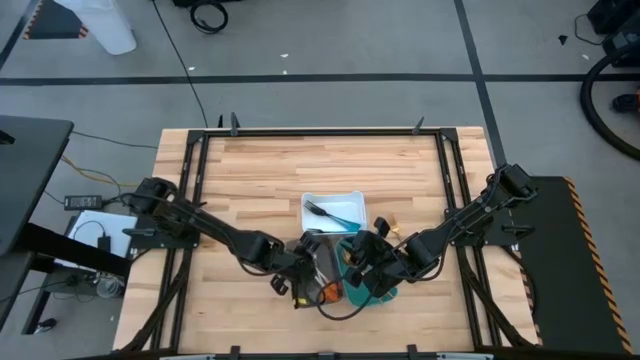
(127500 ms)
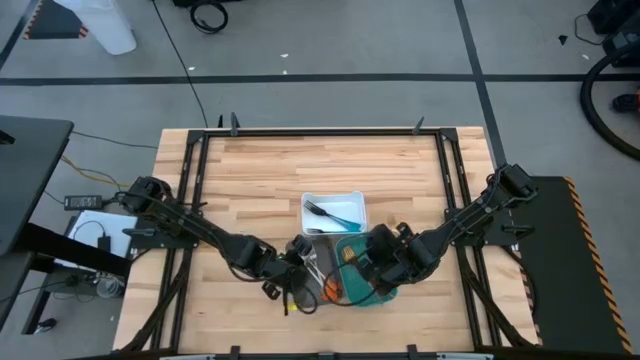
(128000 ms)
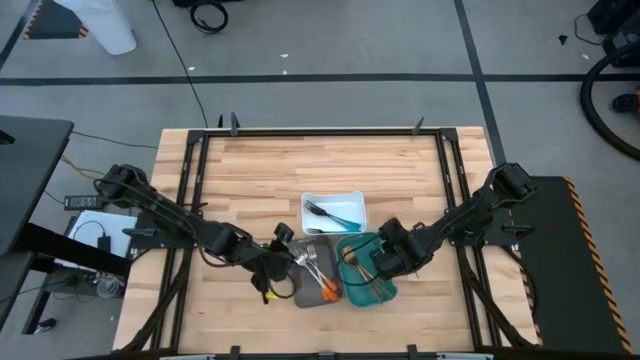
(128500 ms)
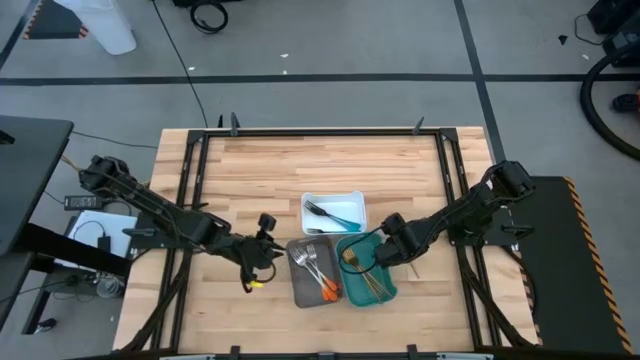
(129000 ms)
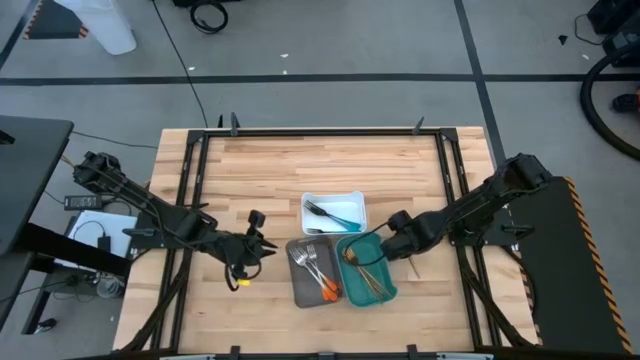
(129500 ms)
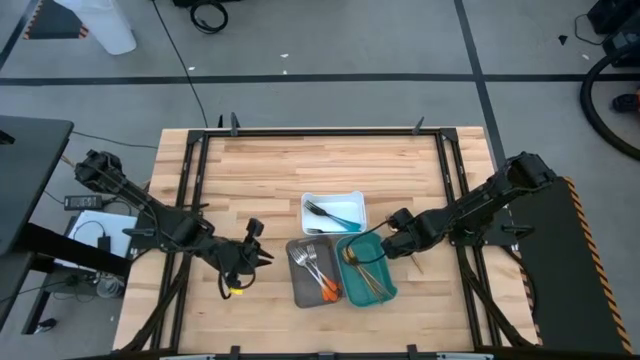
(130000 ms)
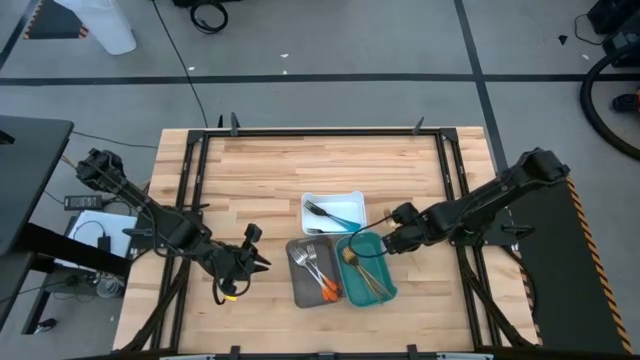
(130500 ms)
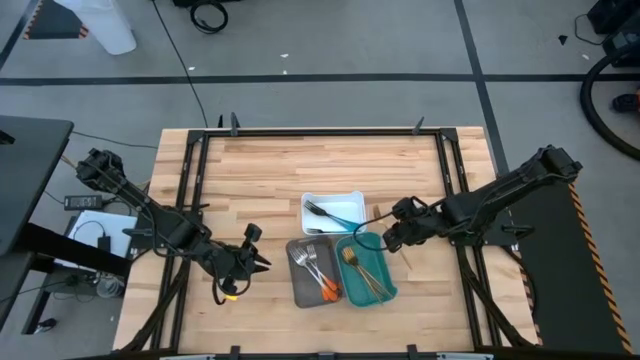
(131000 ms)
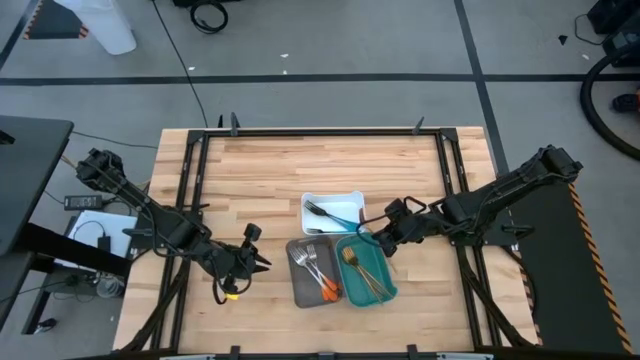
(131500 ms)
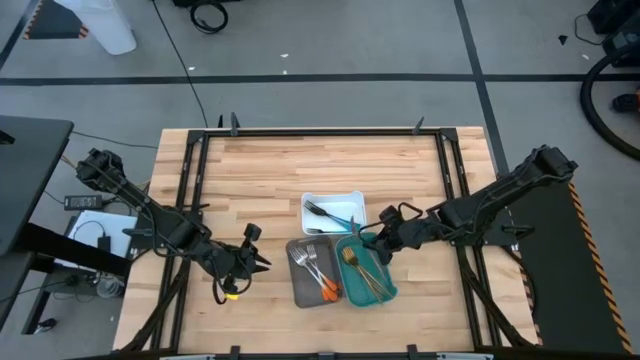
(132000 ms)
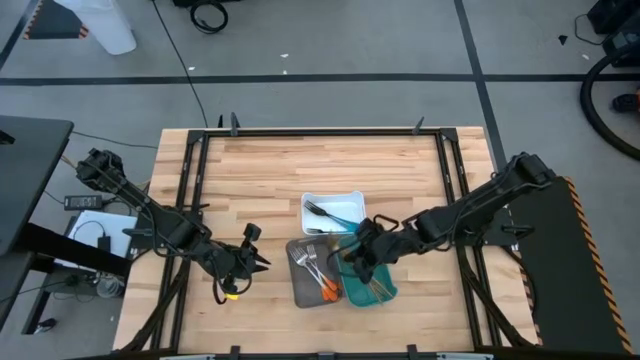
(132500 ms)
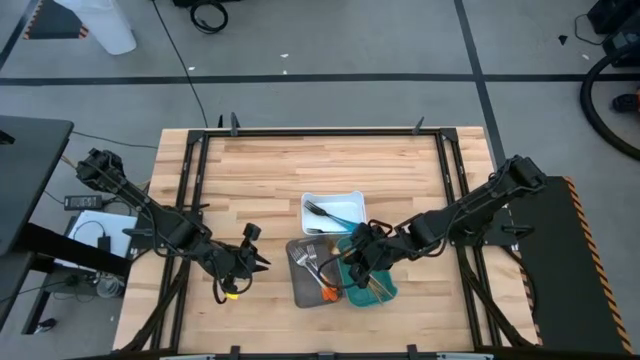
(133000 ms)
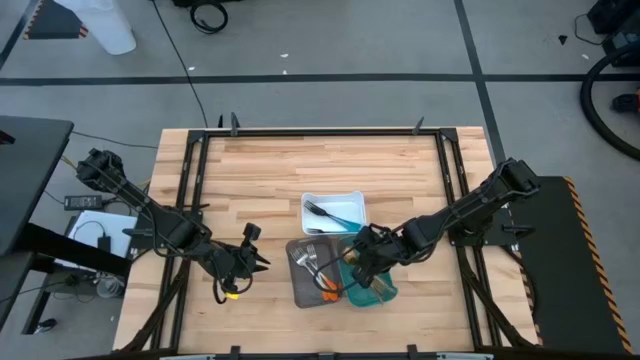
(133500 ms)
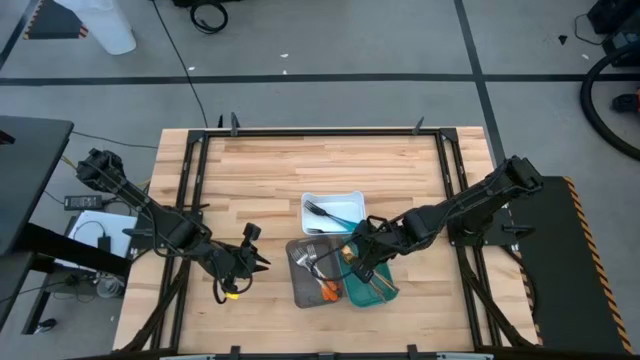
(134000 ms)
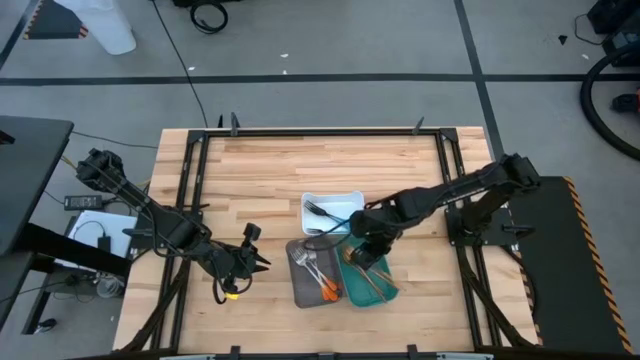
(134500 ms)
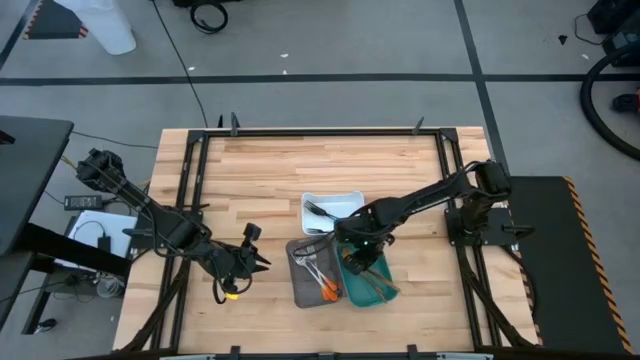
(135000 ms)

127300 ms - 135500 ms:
Task: Sort silverware by color (type)
Put the gold fork into the green bin

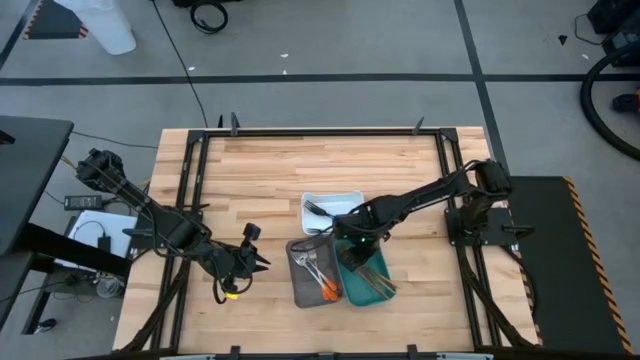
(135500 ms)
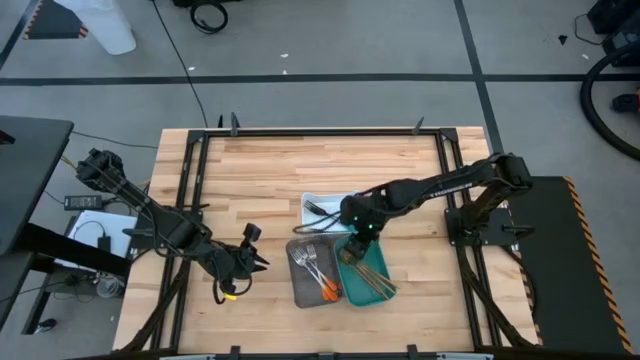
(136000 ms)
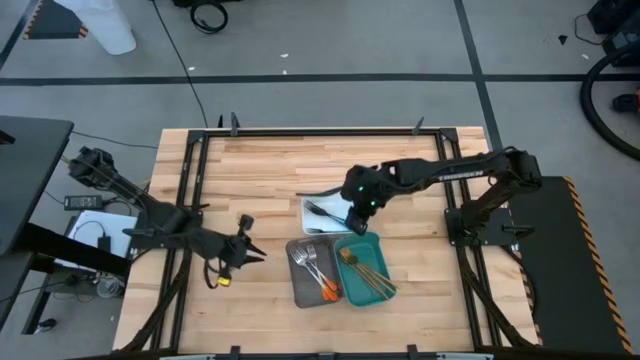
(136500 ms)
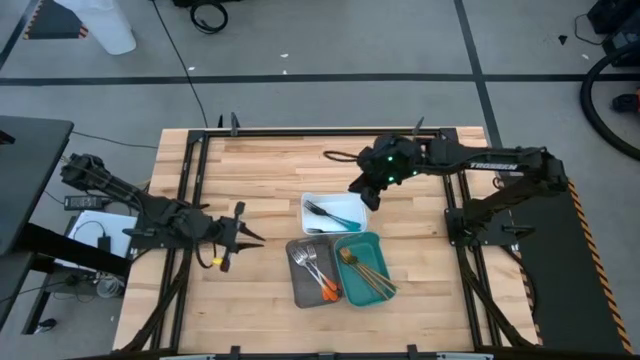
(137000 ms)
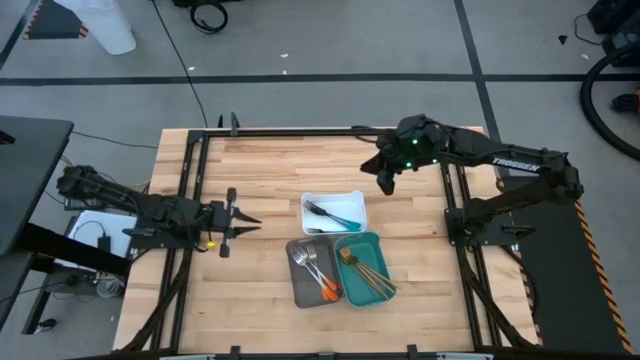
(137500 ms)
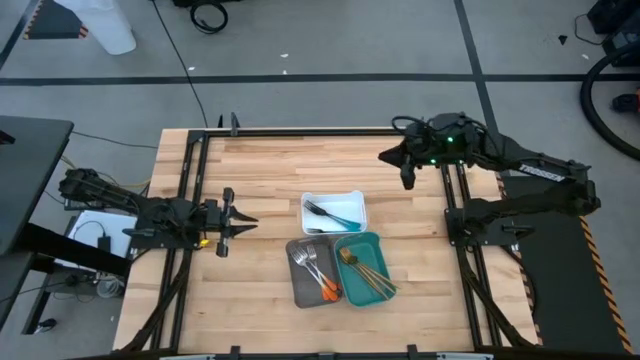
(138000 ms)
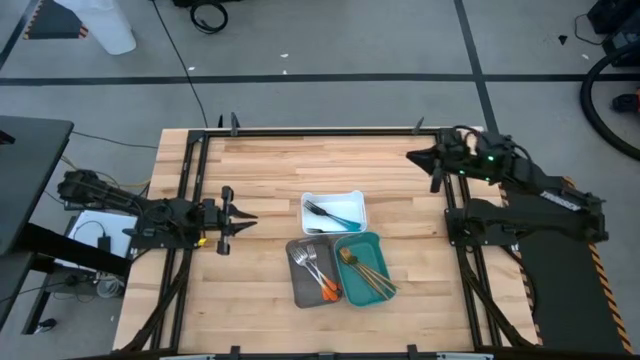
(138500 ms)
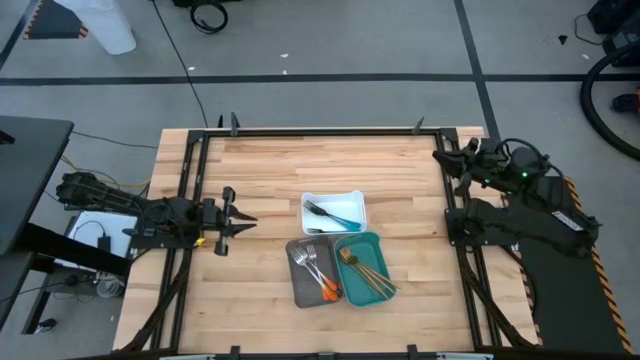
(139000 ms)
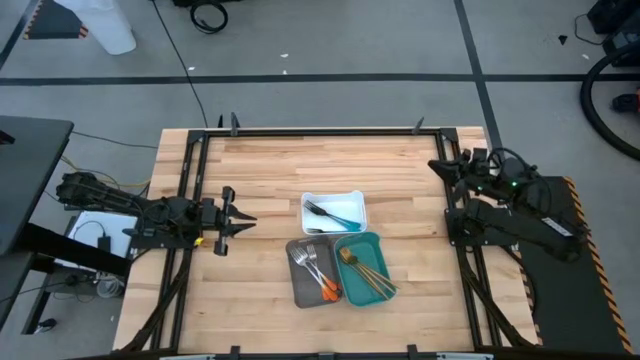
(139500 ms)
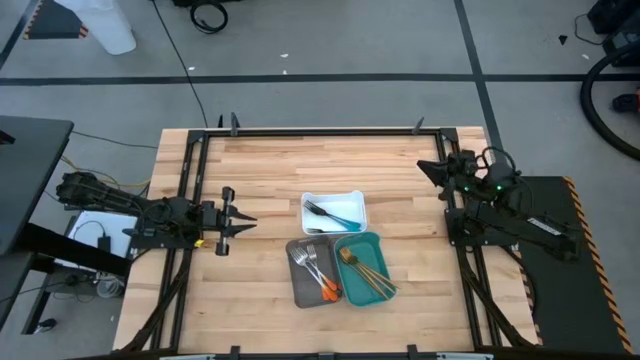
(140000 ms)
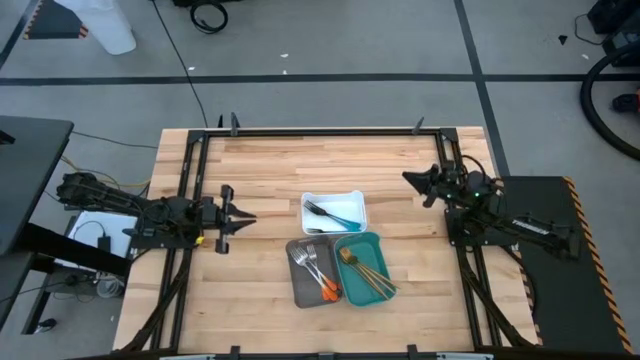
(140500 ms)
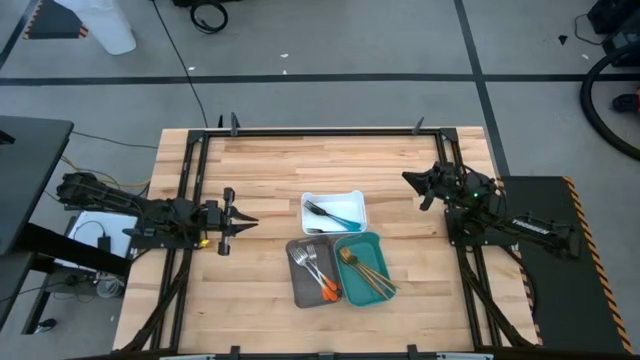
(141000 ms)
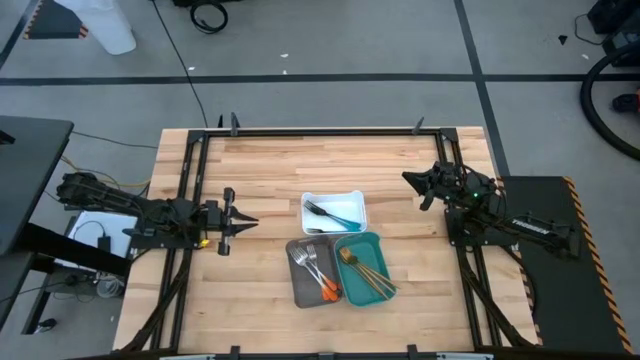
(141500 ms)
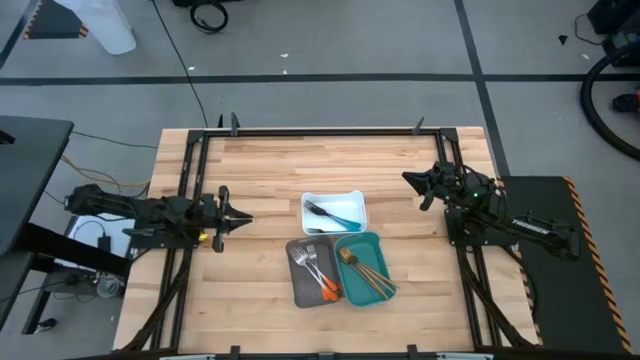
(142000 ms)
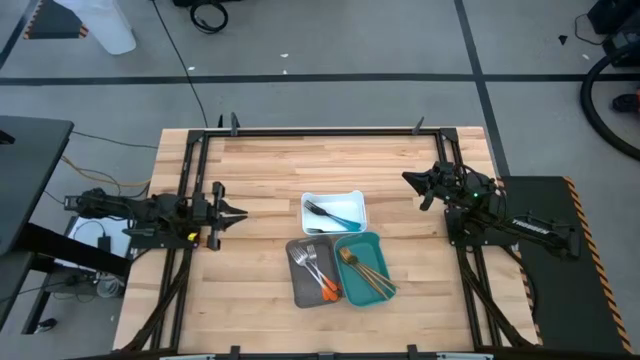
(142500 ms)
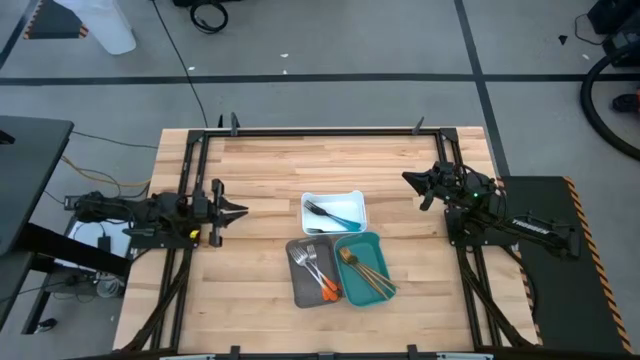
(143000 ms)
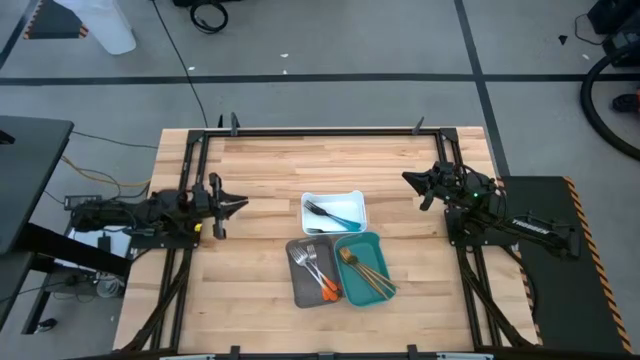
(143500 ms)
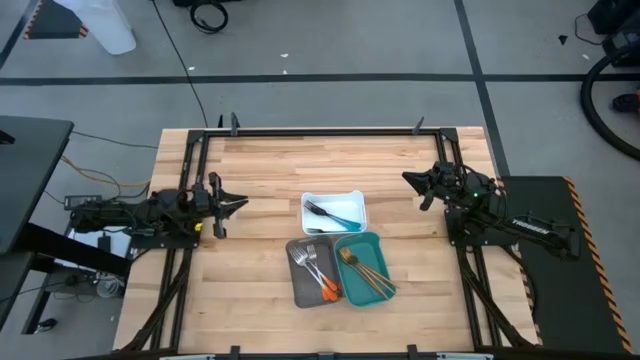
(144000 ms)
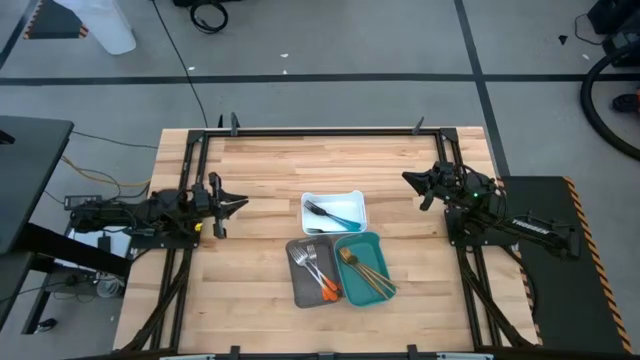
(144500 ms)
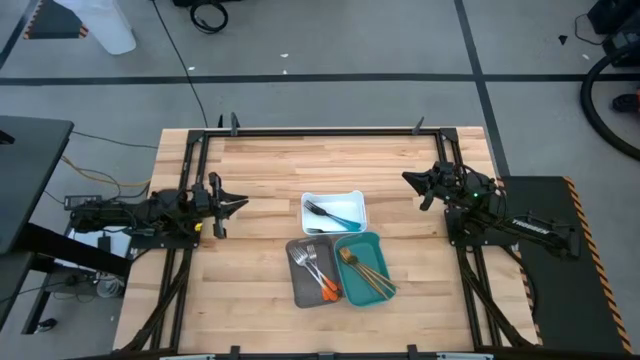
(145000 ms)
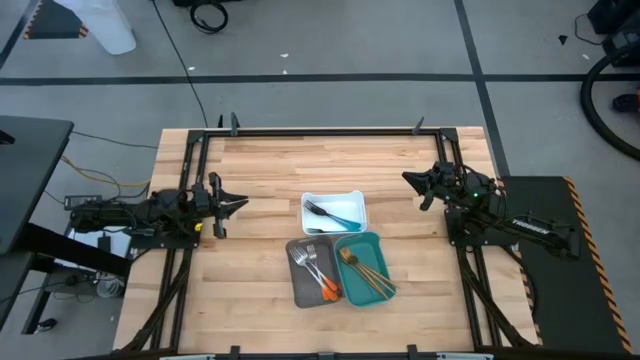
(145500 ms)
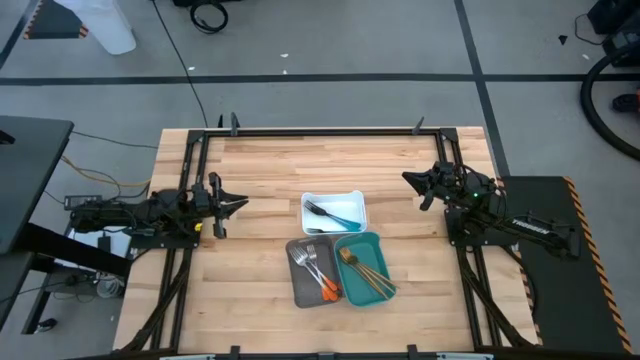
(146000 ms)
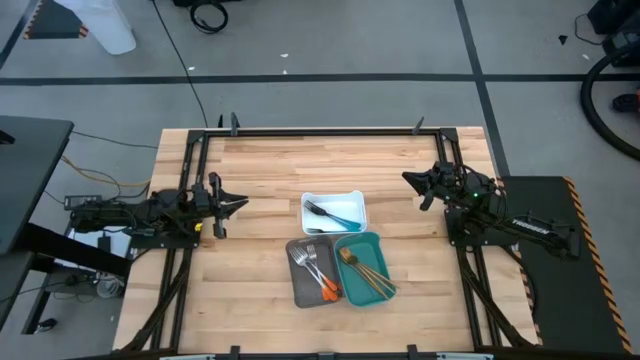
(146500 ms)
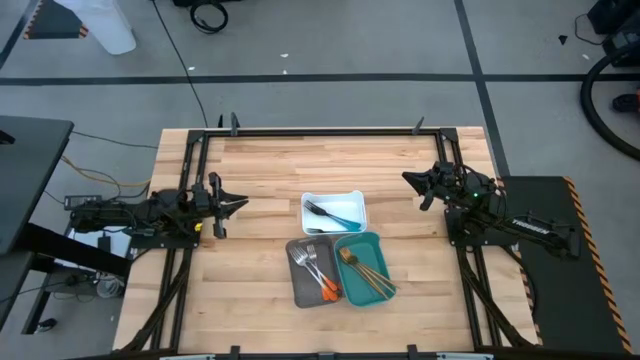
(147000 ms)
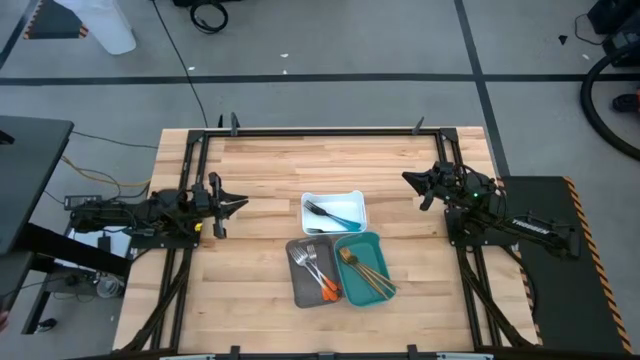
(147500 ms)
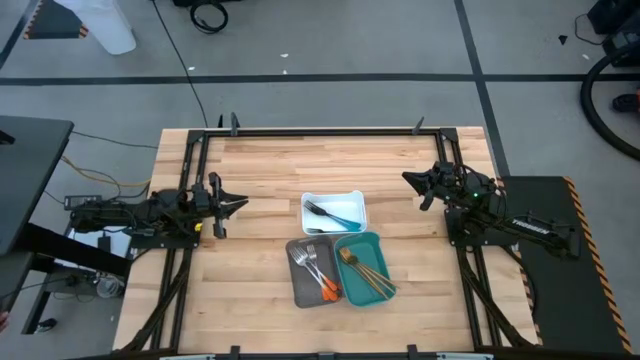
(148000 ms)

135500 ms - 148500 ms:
Return to Home Position
